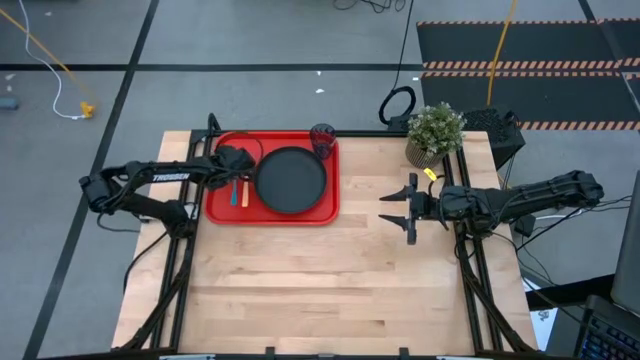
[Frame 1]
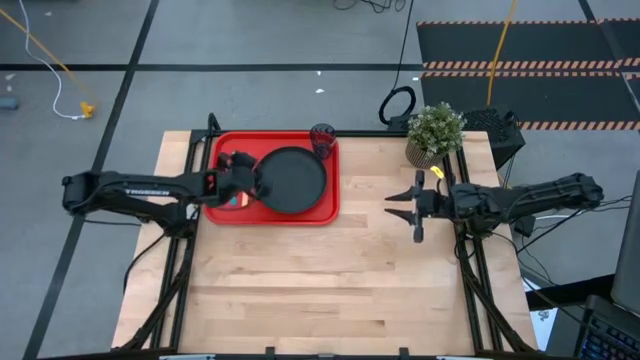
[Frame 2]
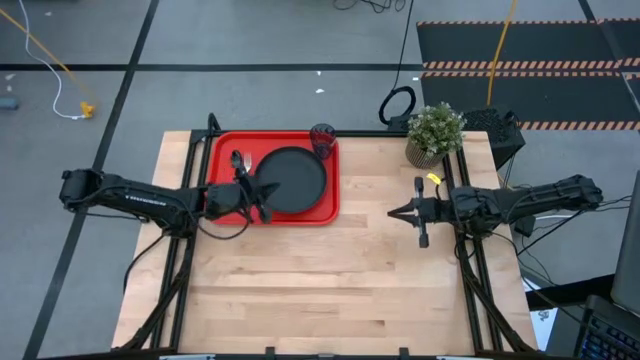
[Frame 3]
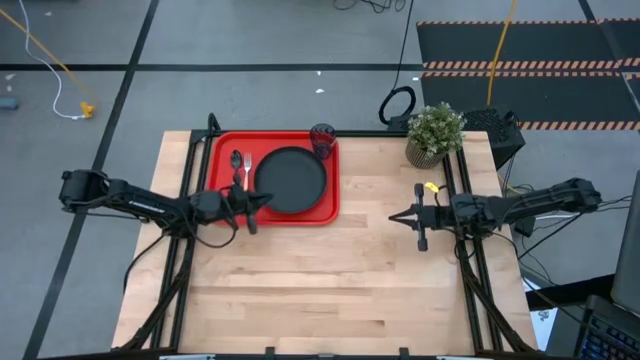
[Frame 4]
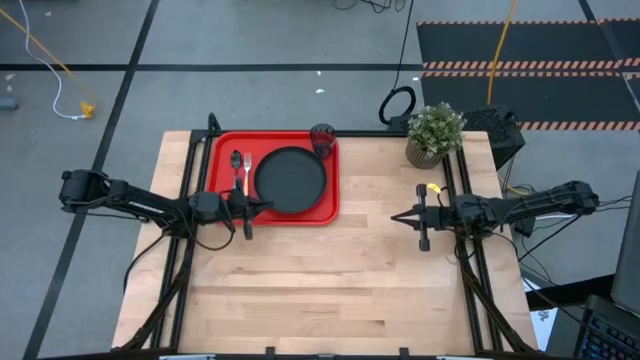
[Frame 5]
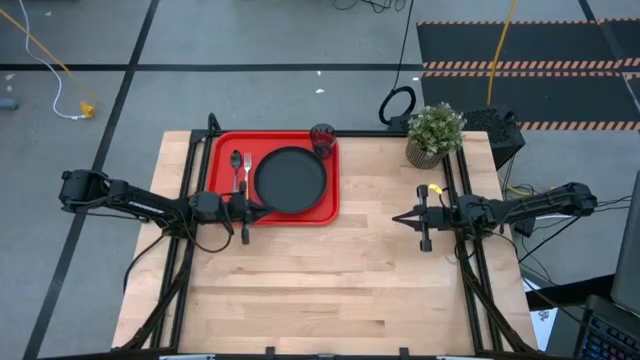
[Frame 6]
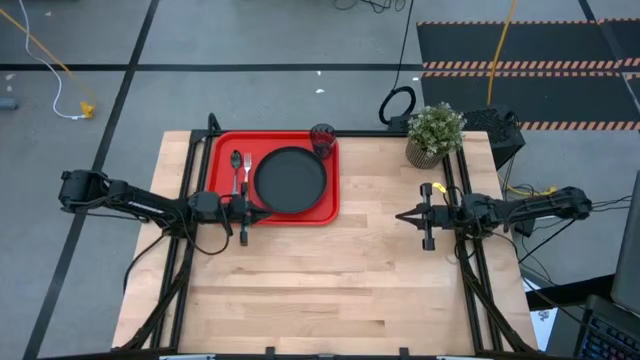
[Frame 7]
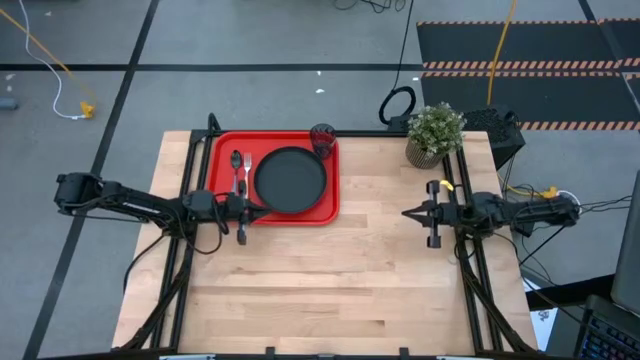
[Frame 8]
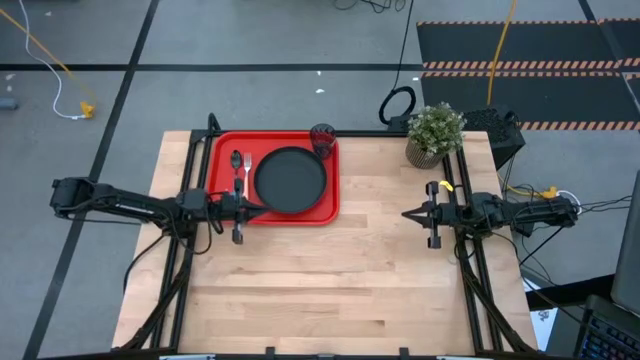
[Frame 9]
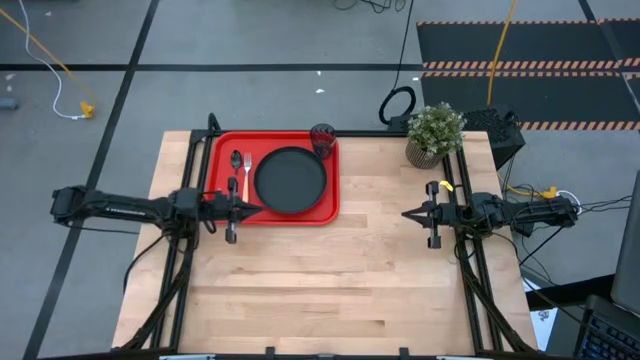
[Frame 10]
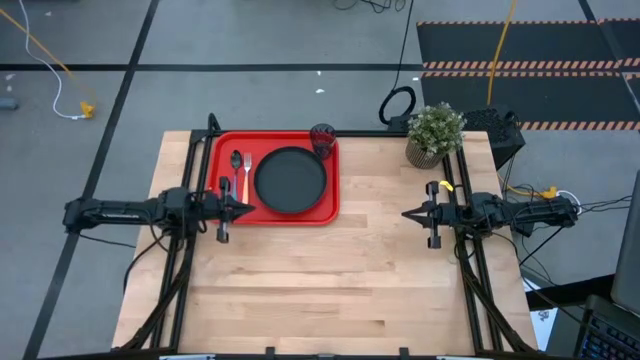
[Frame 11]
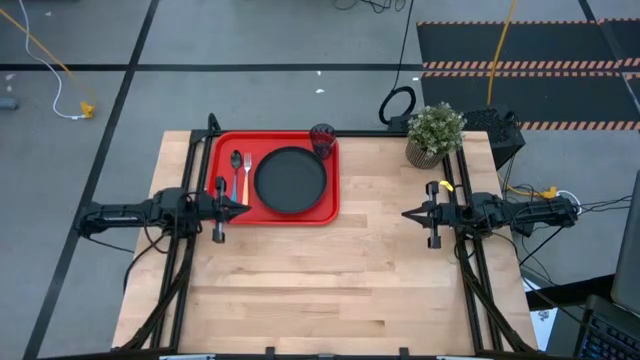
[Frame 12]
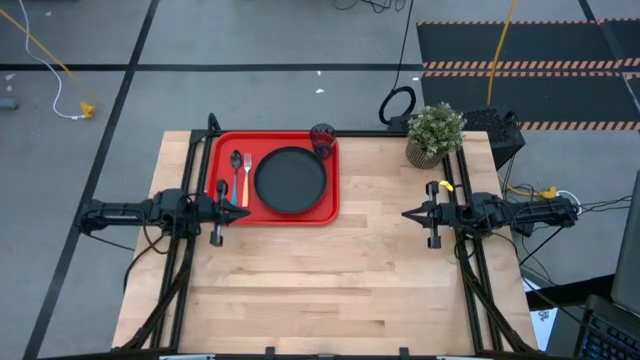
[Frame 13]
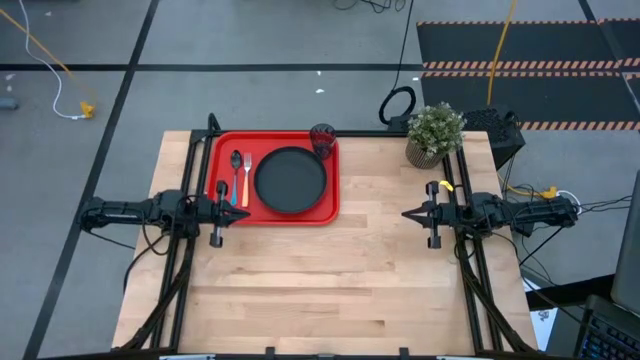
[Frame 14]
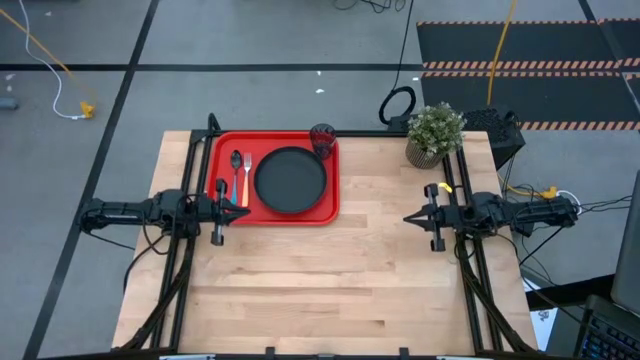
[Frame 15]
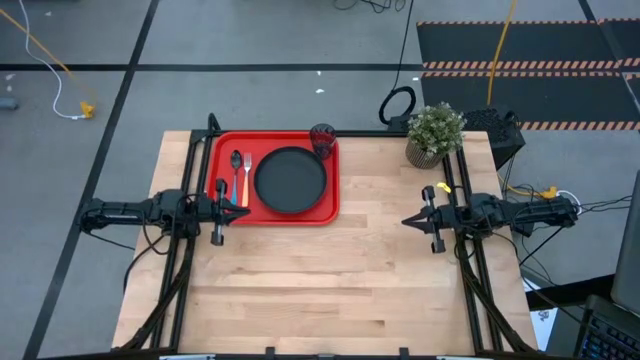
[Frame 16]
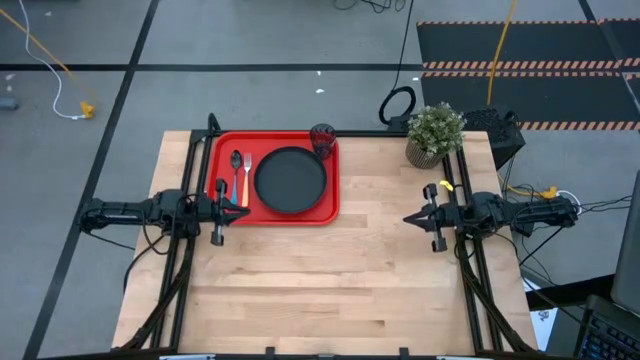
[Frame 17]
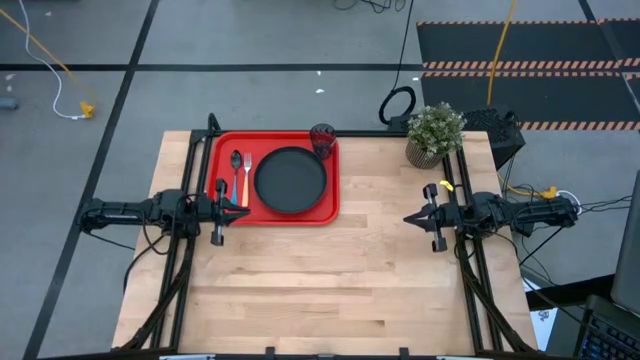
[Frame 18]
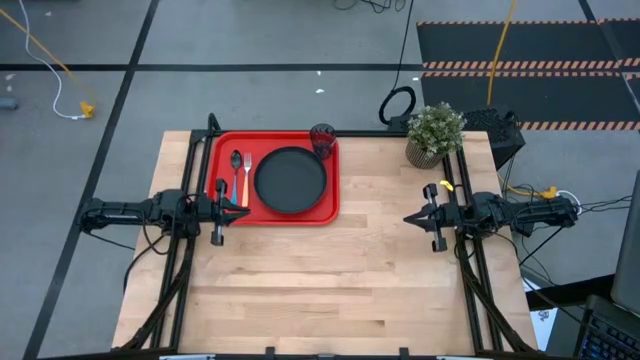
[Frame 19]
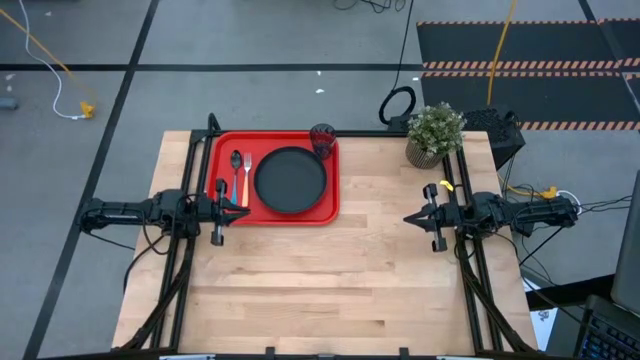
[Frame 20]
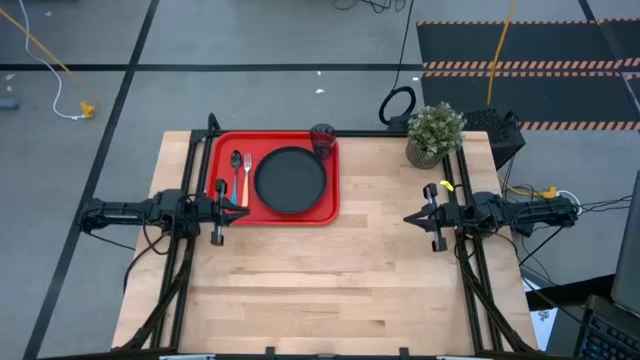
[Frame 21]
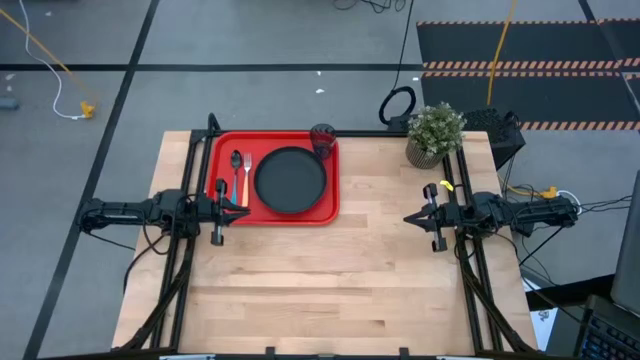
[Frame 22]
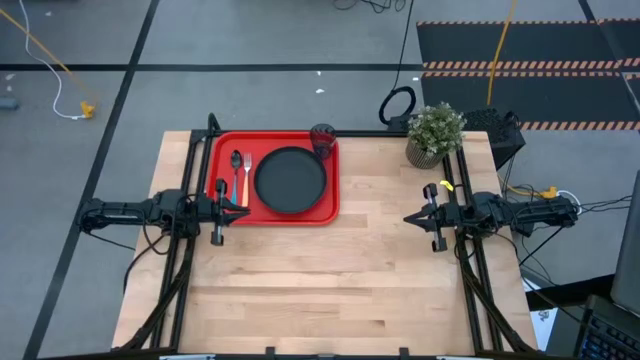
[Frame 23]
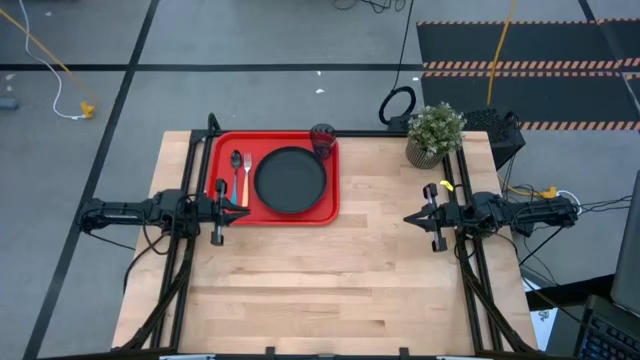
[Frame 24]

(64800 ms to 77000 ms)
Task: Pick and place plate/cup/fork/spoon on tray
Return to Home Position

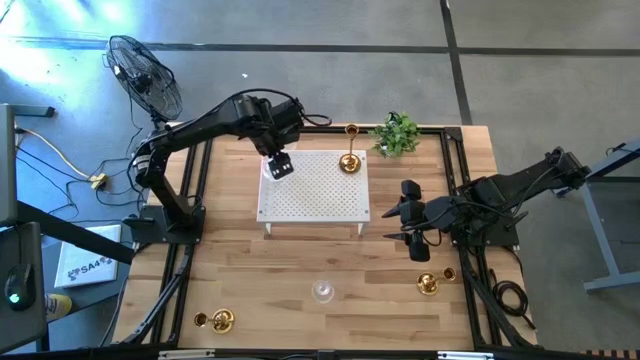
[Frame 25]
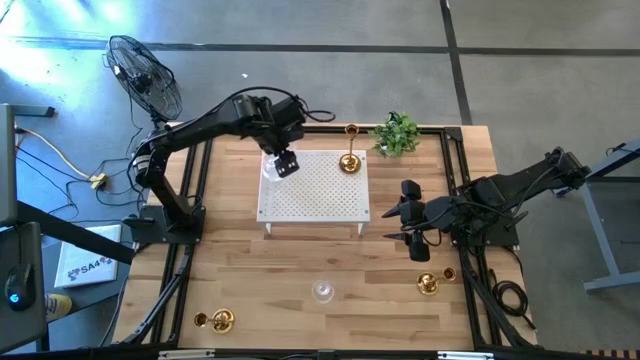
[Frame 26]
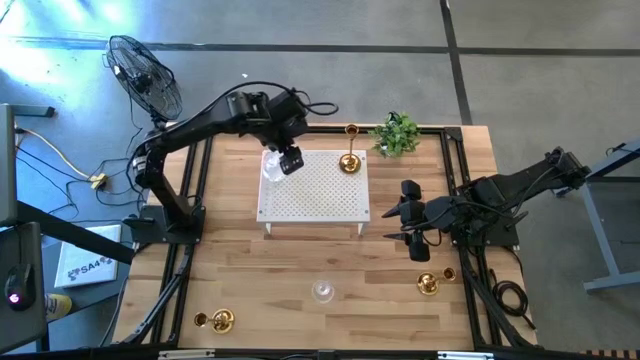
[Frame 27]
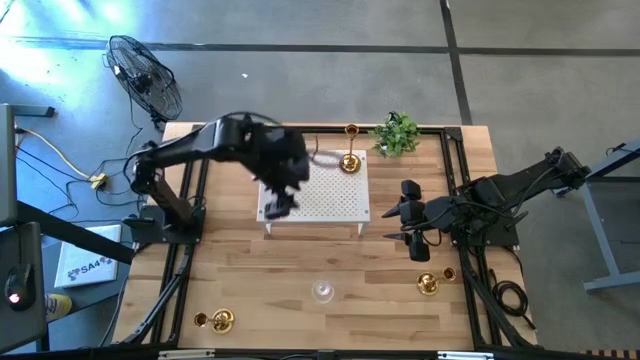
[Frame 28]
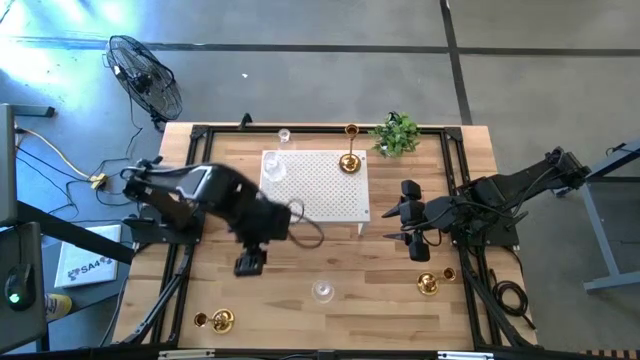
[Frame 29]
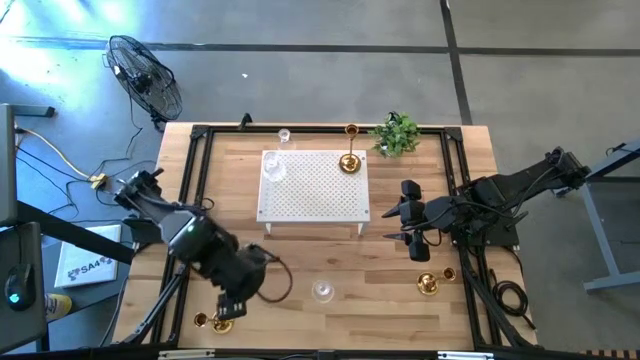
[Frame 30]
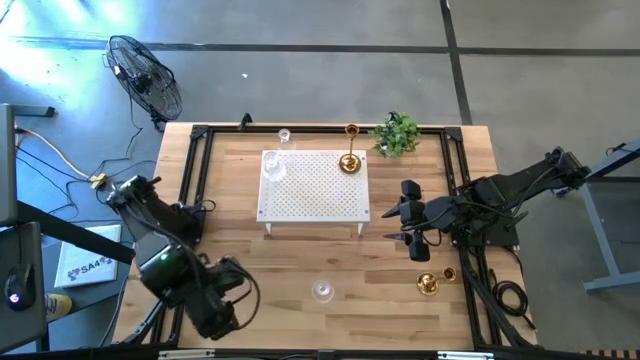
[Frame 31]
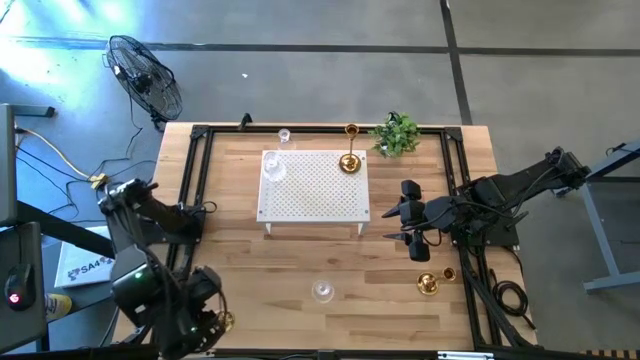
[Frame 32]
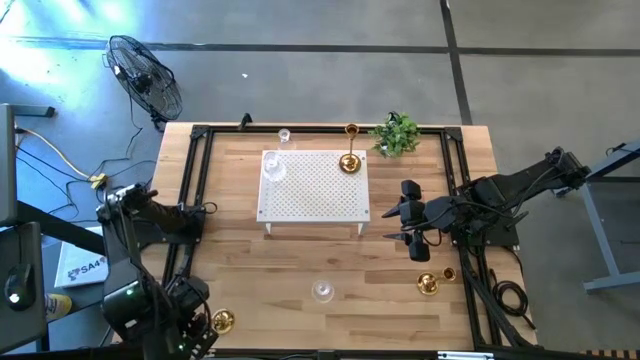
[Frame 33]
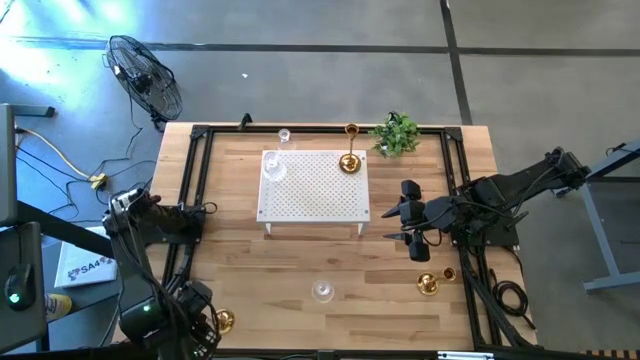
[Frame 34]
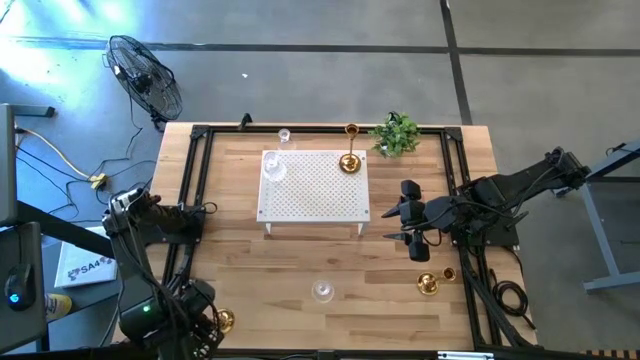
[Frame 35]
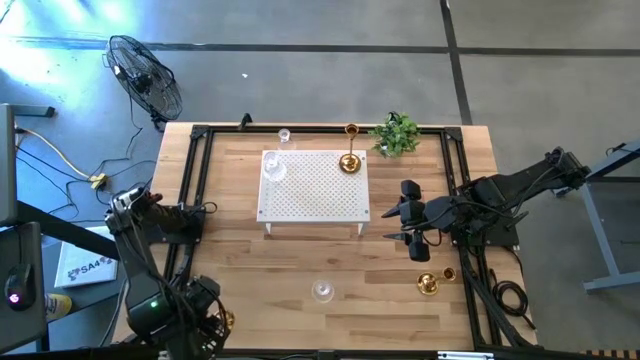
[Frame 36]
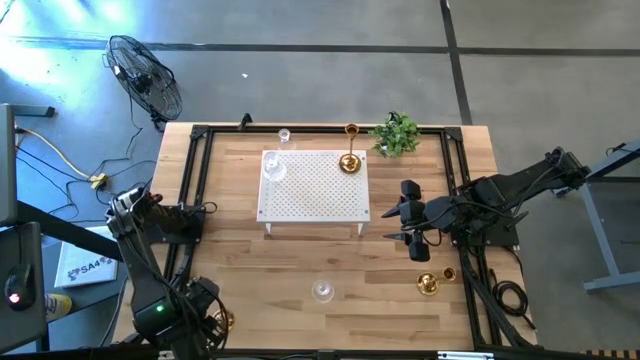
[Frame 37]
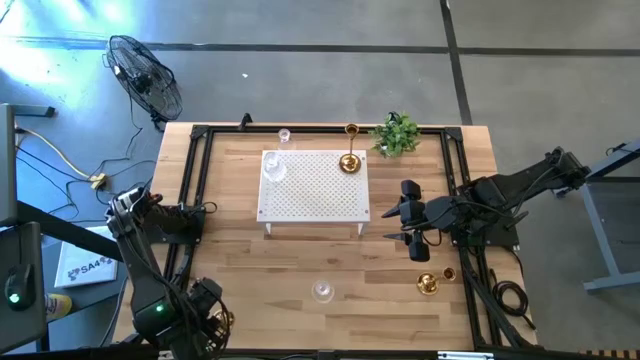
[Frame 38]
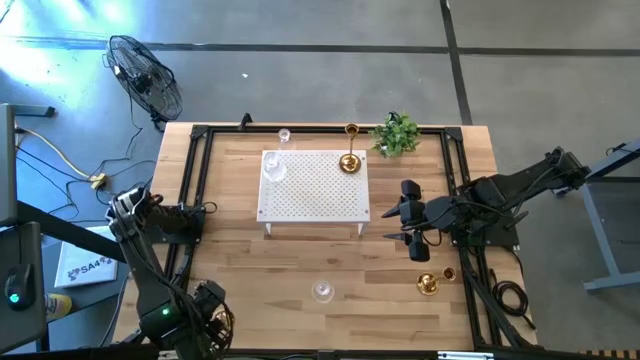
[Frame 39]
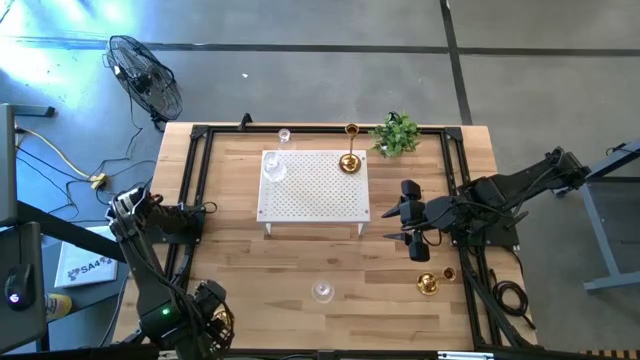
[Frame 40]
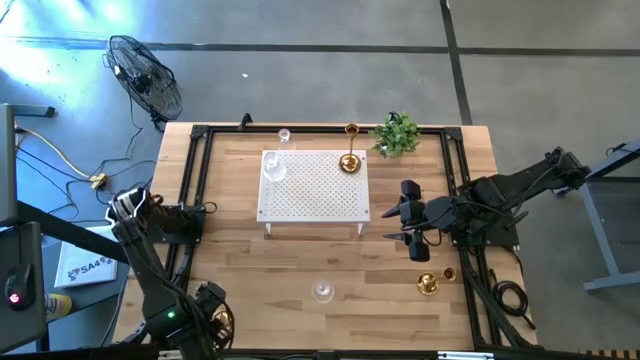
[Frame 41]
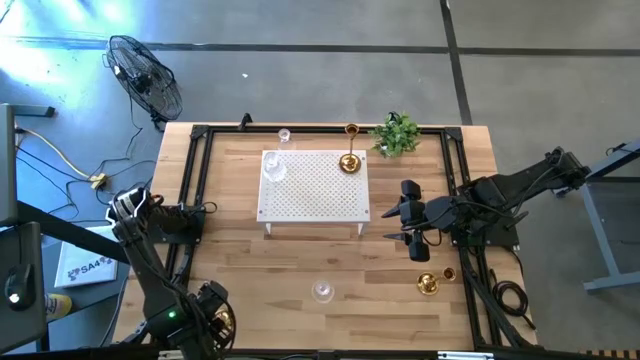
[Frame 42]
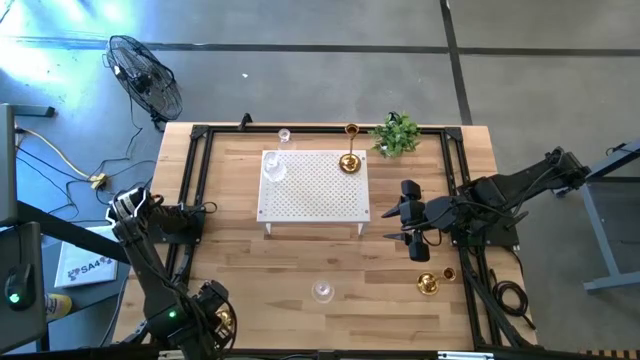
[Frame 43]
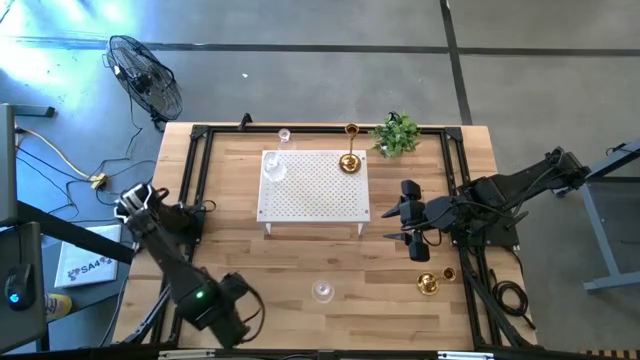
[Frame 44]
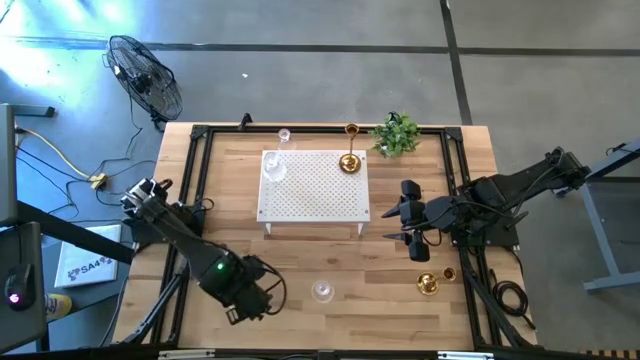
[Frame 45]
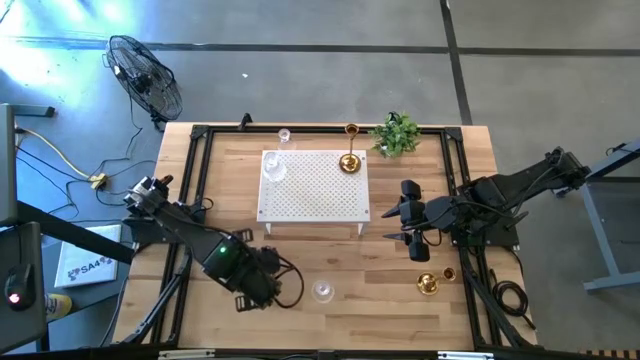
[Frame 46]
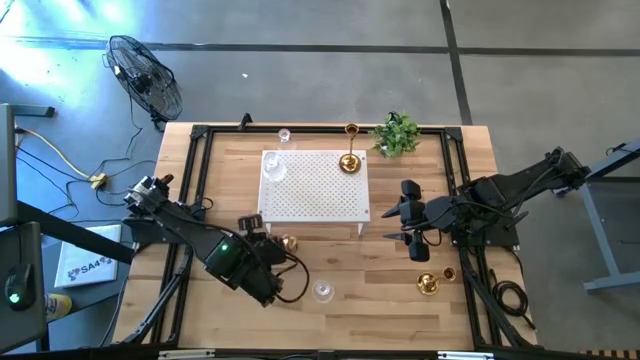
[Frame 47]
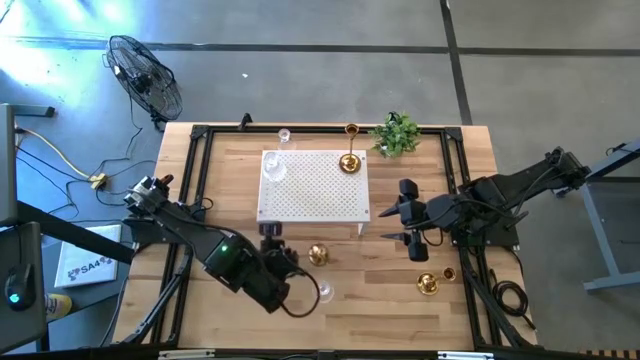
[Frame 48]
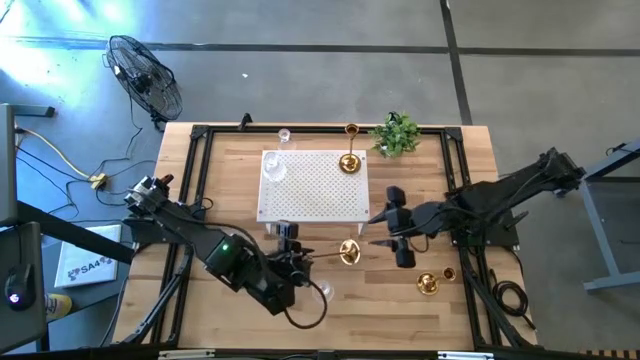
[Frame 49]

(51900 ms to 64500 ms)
Task: Pick & Place candle stick holders
Put the left gold candle holder on the shelf aligned with the other gold candle holder
